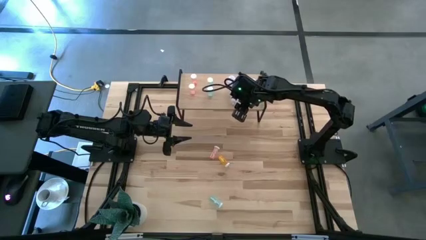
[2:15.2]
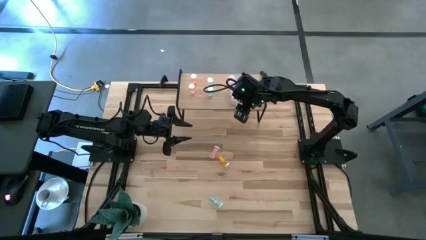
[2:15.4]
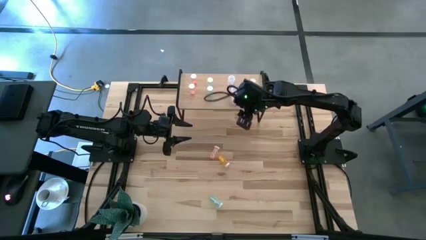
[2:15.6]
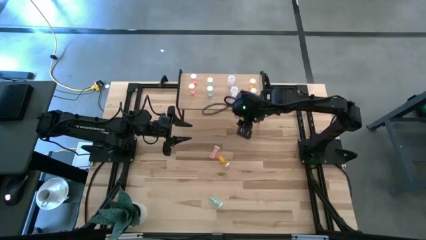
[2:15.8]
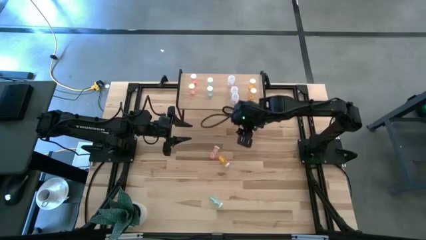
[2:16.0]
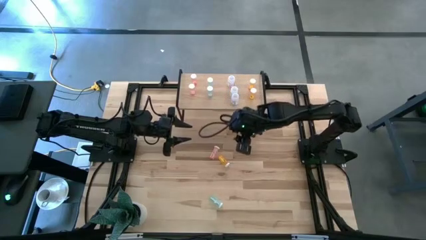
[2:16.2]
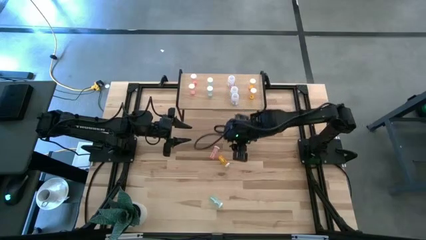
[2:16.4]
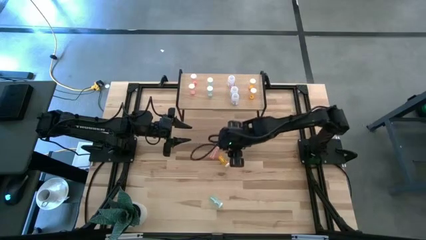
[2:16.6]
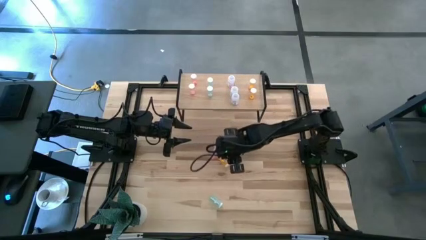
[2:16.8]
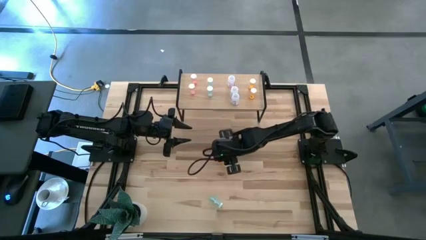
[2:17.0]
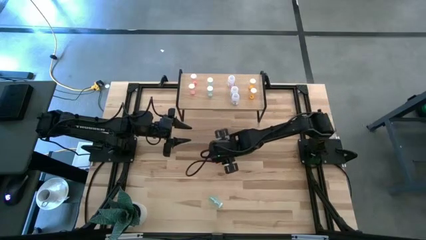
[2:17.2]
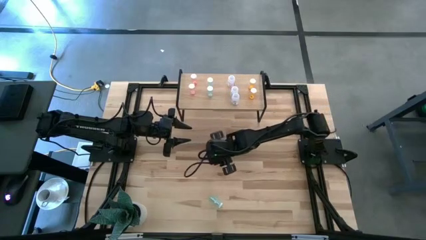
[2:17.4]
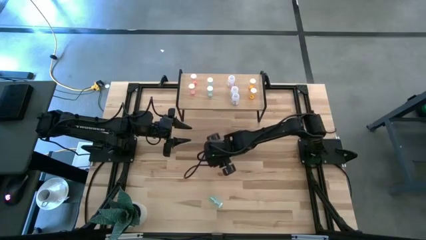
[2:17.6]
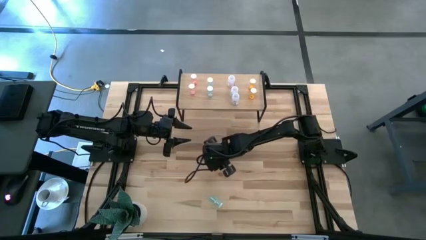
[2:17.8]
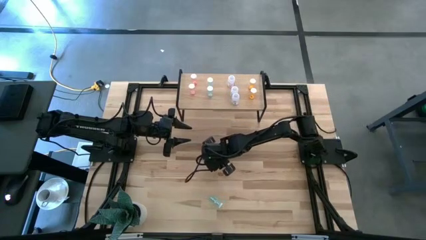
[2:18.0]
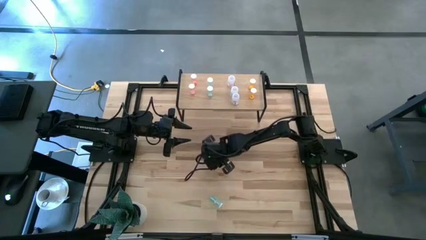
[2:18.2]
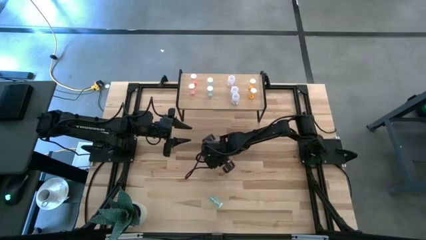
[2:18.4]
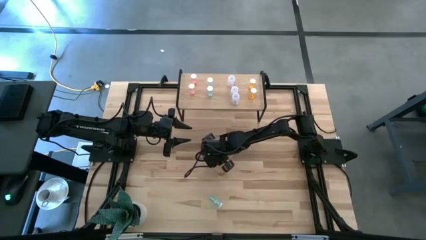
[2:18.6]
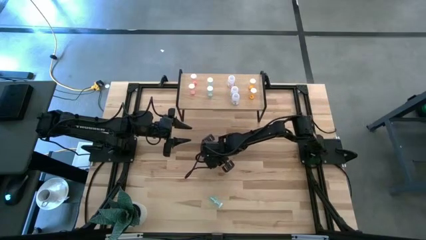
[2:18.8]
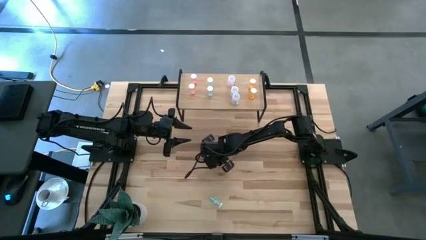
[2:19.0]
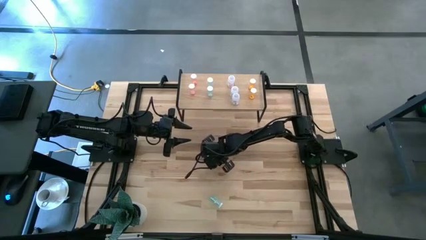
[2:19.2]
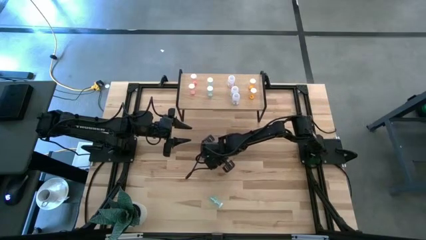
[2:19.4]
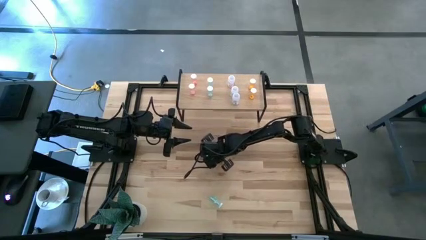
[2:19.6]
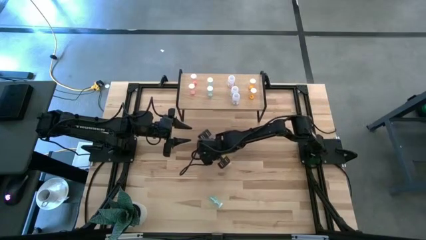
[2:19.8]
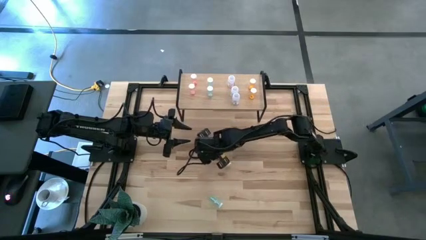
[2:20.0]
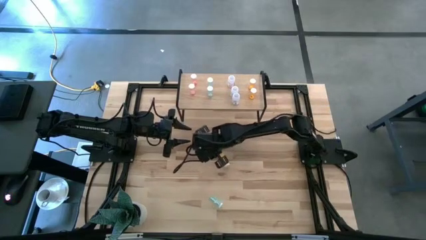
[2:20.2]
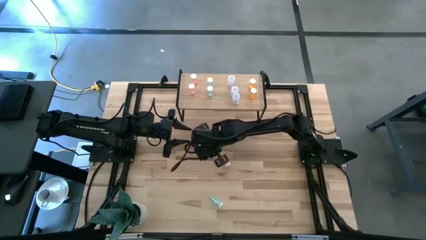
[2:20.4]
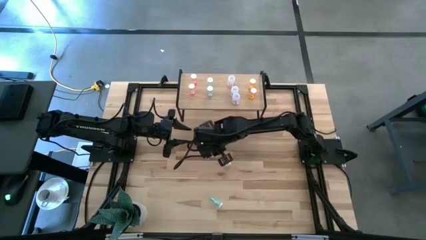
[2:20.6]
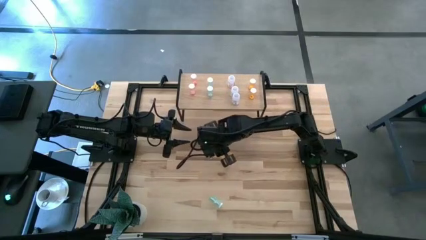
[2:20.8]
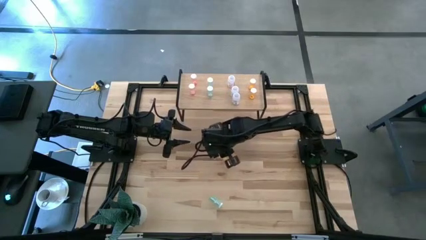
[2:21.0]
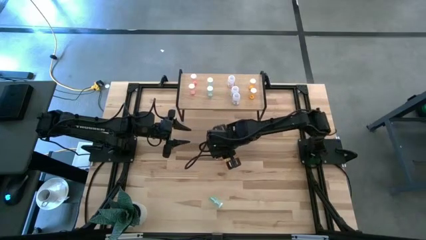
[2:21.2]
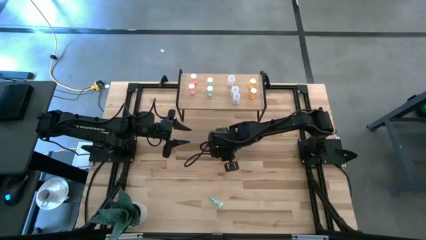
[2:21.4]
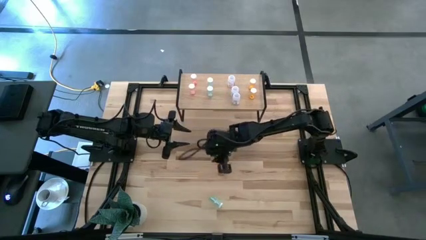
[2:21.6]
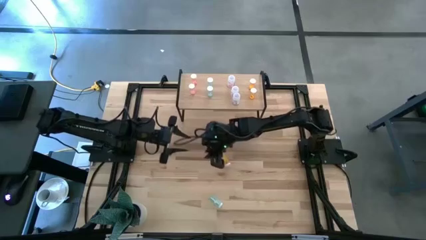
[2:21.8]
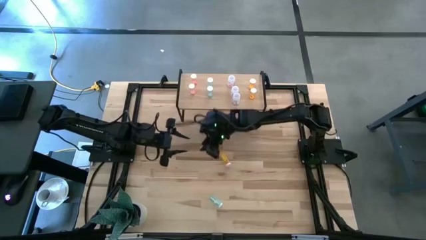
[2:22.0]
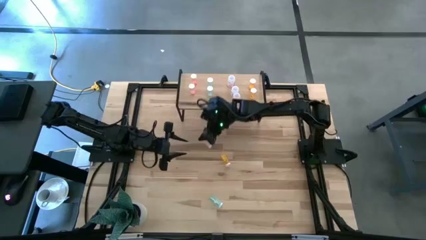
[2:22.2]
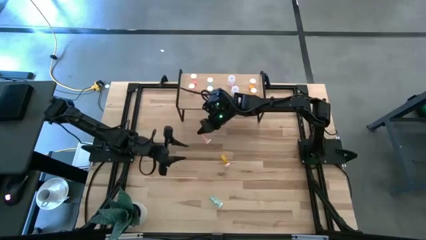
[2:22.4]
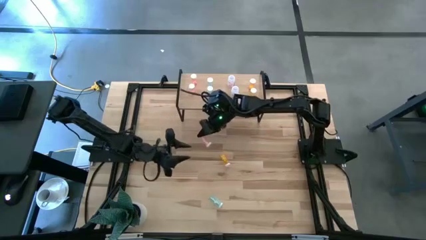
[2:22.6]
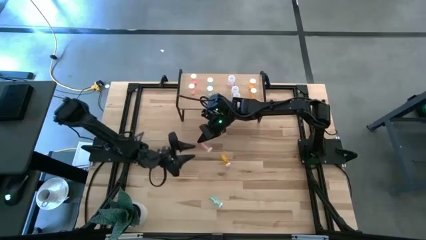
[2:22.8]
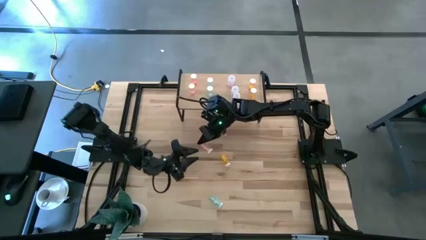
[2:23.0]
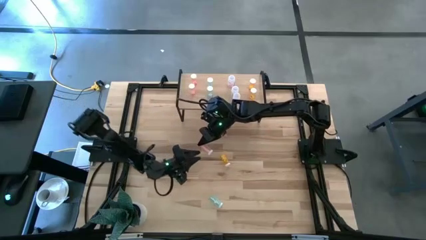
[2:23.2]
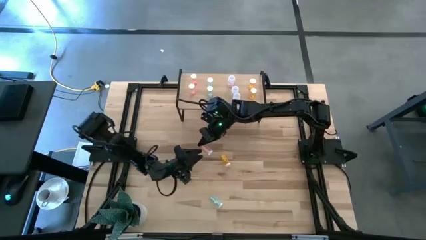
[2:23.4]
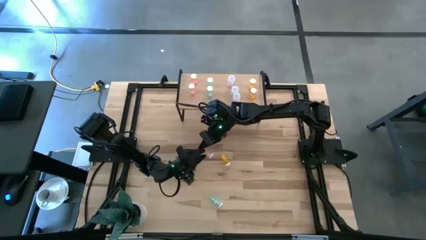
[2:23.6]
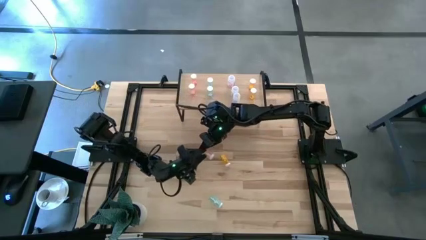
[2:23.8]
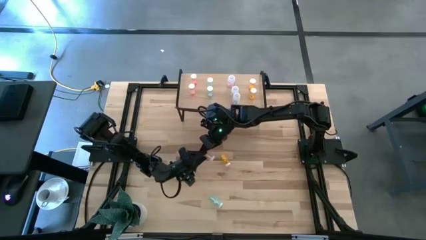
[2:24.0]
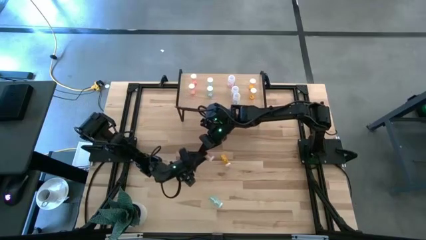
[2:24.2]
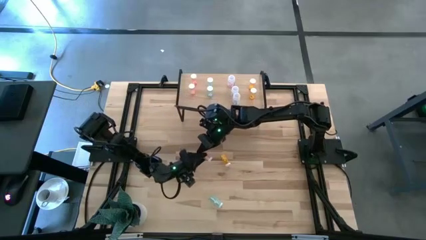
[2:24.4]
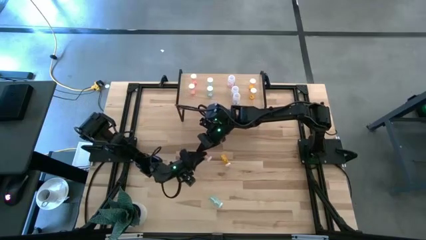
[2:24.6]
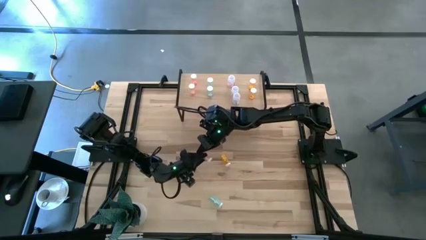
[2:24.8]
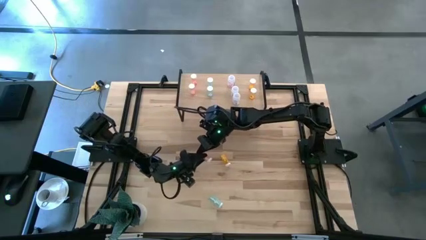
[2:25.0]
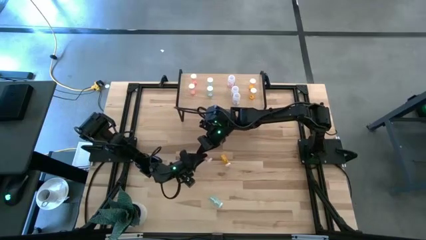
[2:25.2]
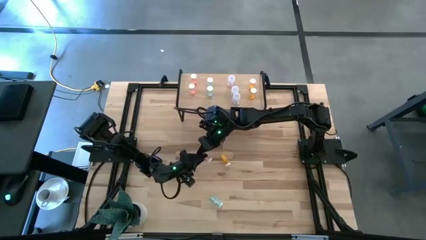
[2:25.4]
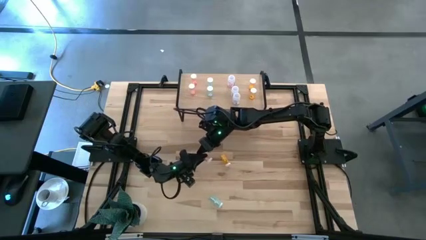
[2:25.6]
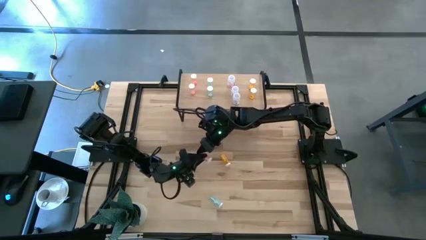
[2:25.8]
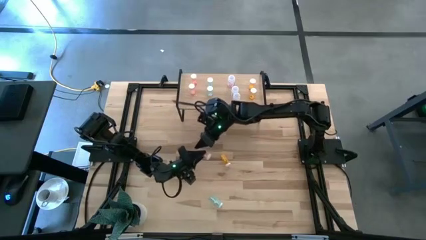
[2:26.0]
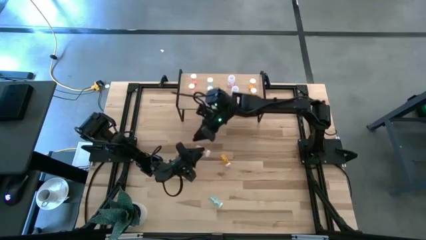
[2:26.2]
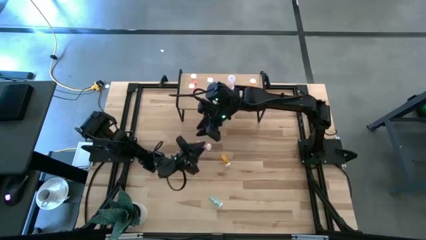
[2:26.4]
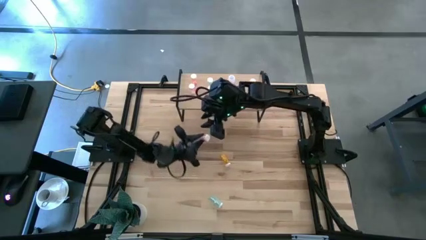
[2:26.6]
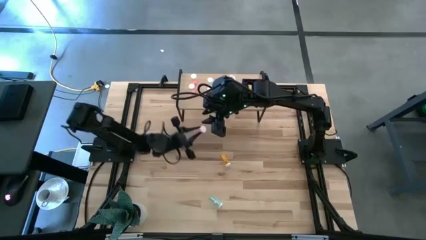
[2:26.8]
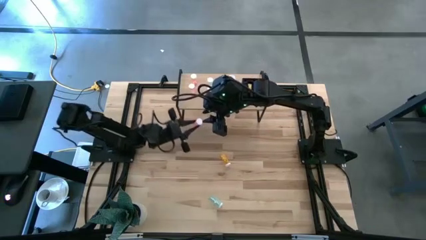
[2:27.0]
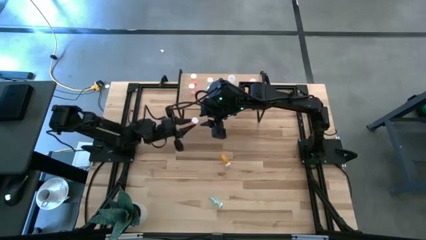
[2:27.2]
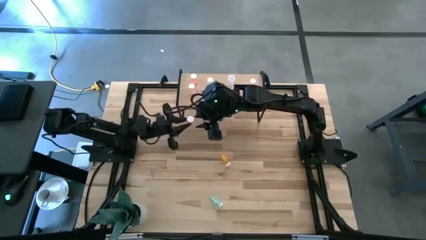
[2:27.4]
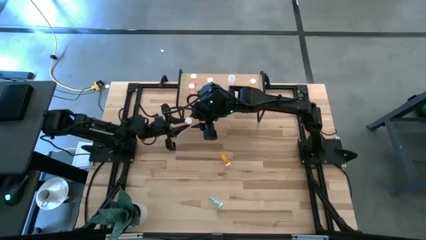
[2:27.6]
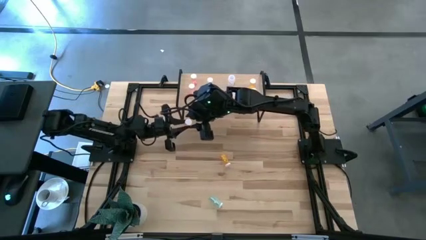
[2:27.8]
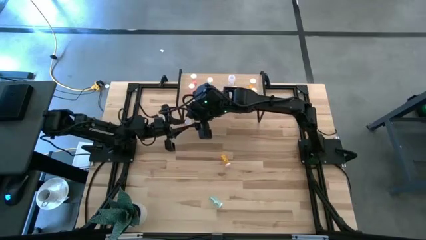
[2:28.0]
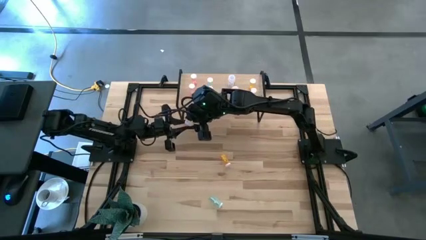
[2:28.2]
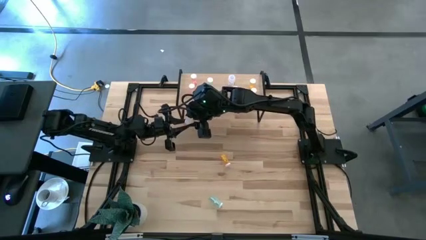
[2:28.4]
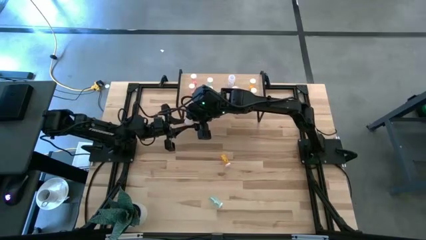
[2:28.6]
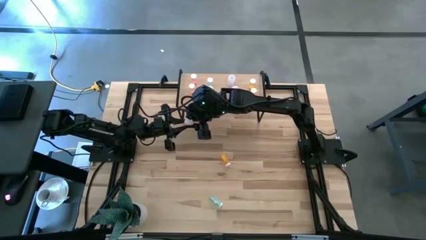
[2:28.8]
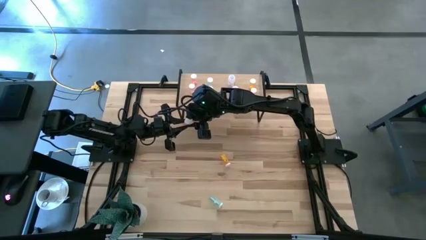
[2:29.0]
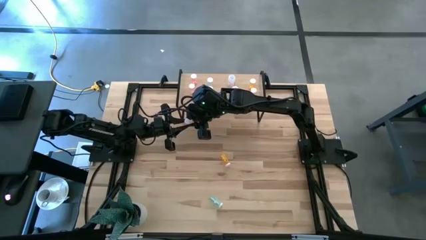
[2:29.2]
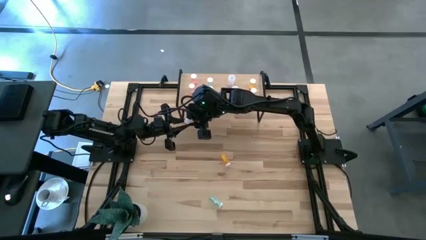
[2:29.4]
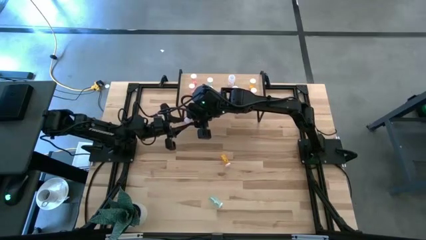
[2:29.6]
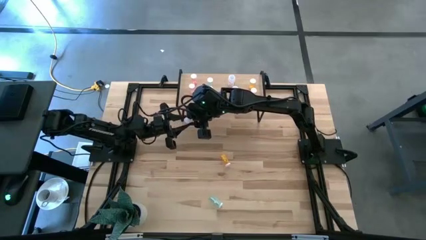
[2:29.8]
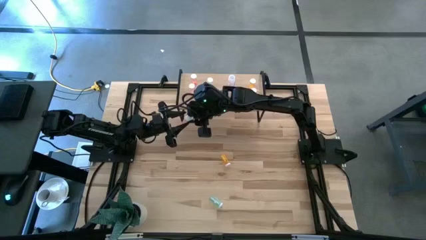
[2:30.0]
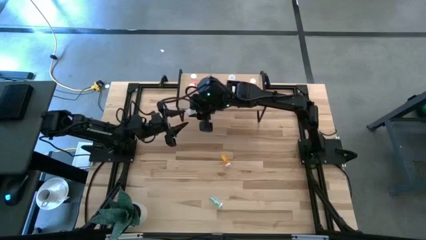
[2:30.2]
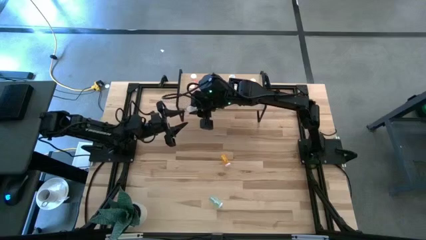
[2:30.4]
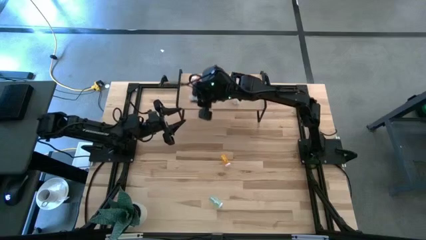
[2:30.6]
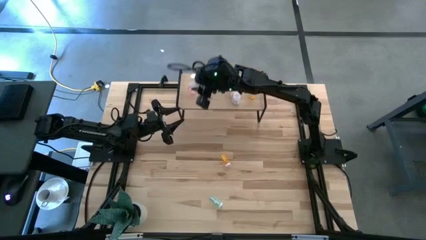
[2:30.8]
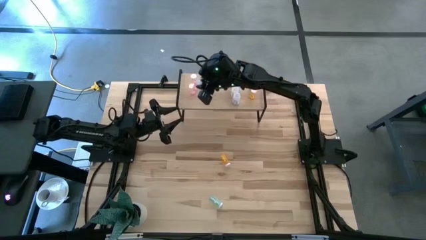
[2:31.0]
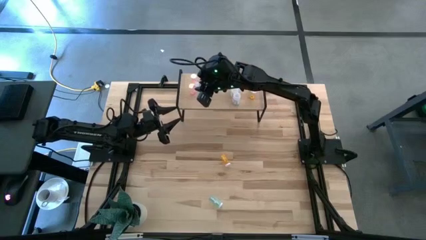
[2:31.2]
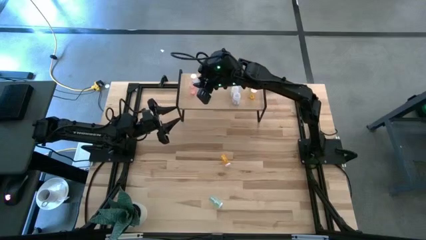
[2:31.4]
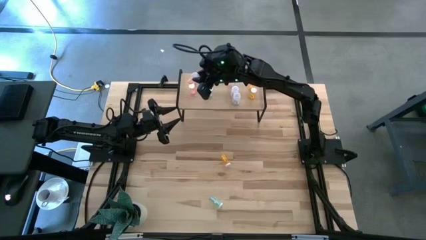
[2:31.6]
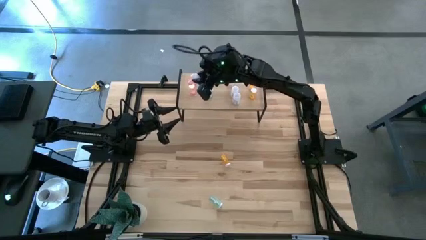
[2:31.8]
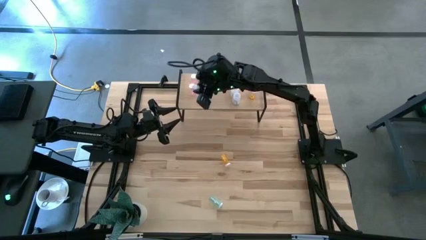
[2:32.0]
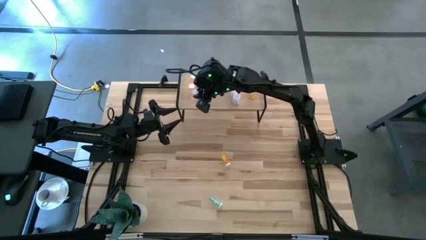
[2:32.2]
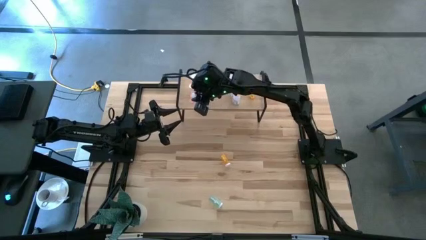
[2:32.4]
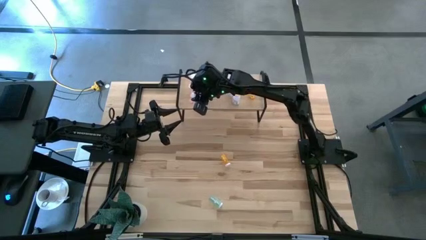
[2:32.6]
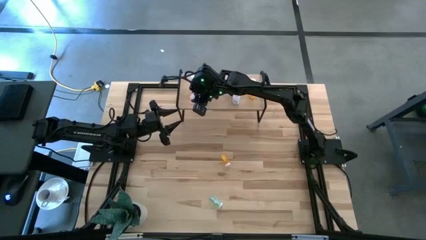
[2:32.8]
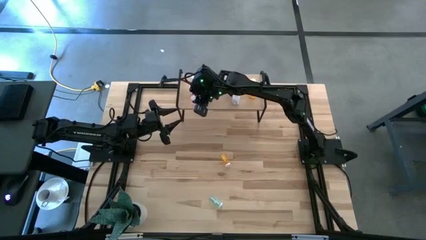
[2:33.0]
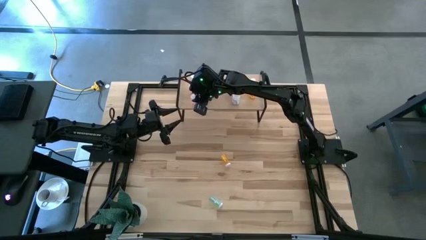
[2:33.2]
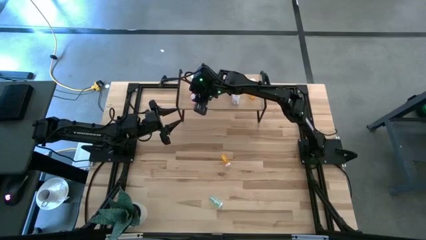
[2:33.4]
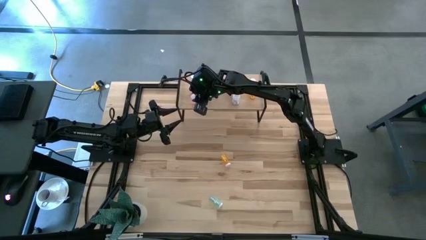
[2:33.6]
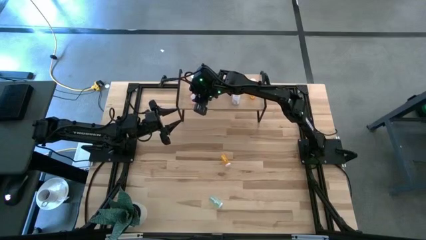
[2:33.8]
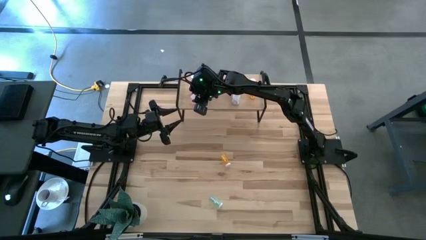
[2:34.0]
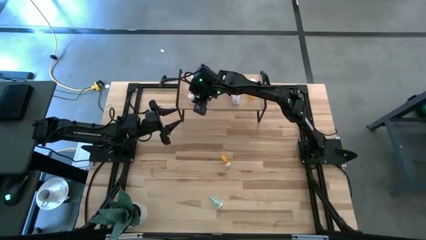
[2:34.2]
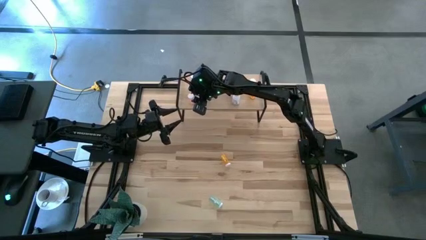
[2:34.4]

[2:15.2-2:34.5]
Task: Pick and place medicine bottles onto shelf by color
Put the pink pill bottle on the shelf aligned with the other pink pill bottles
